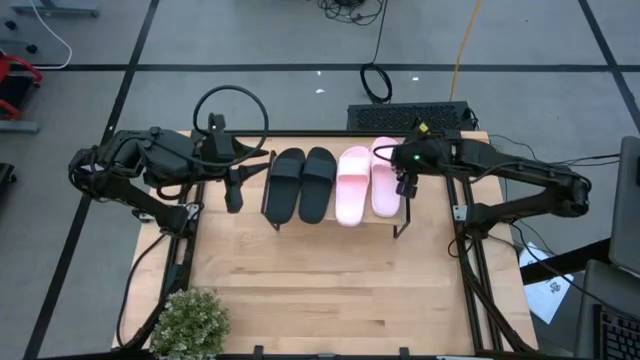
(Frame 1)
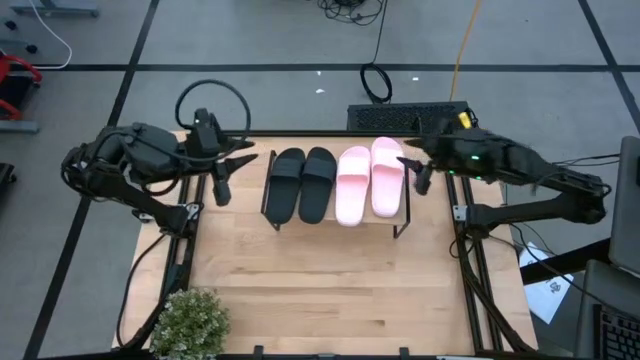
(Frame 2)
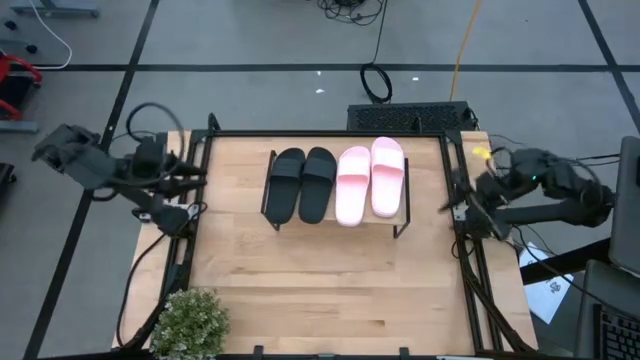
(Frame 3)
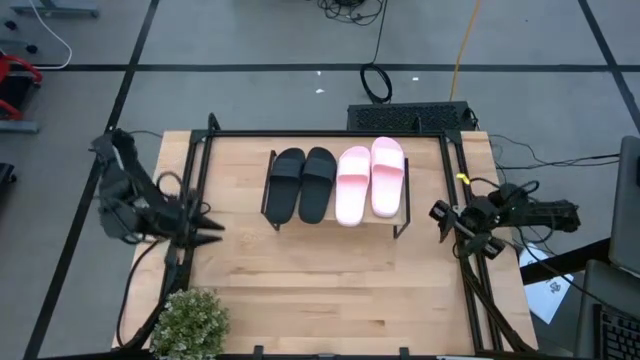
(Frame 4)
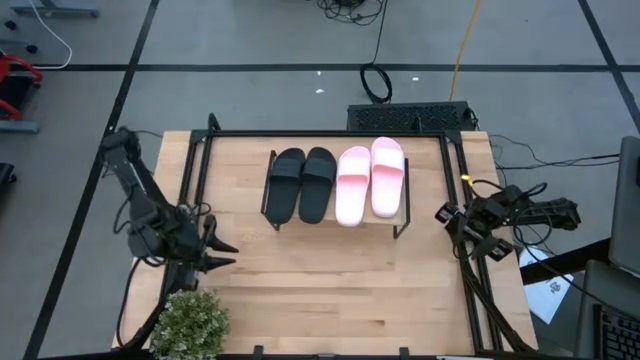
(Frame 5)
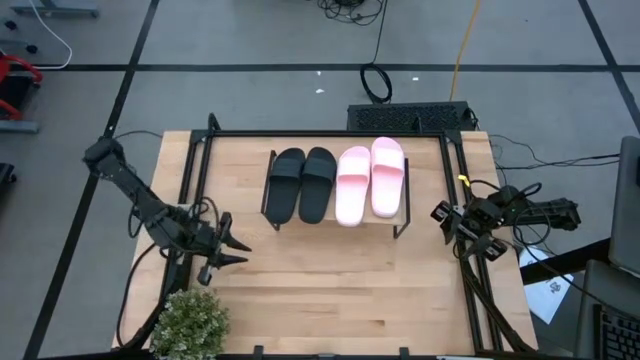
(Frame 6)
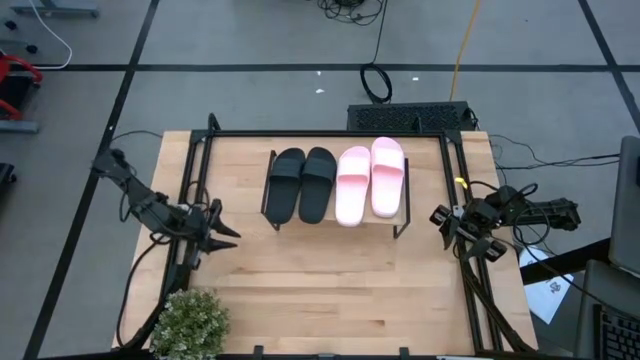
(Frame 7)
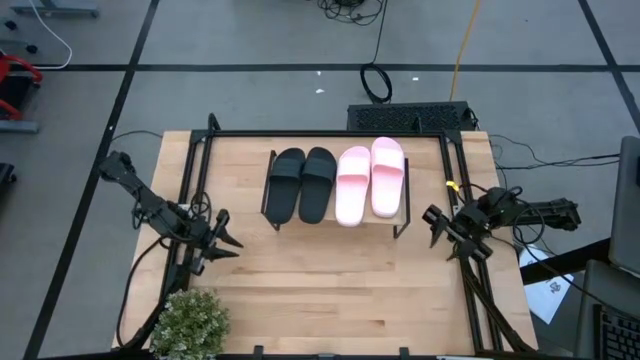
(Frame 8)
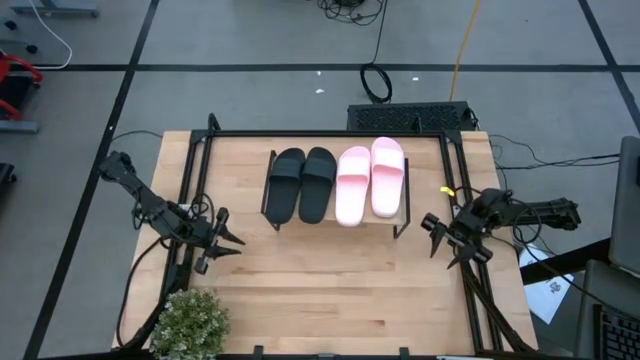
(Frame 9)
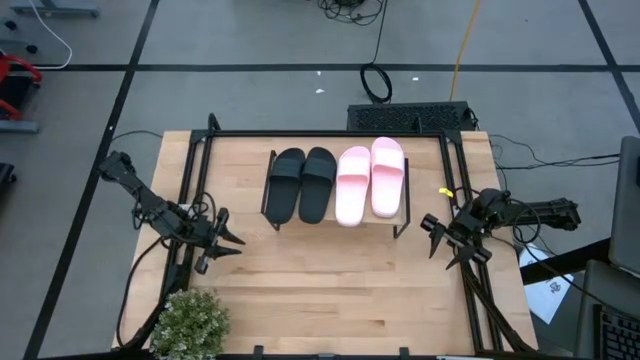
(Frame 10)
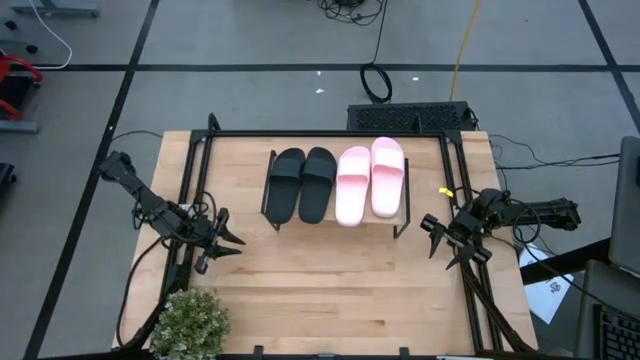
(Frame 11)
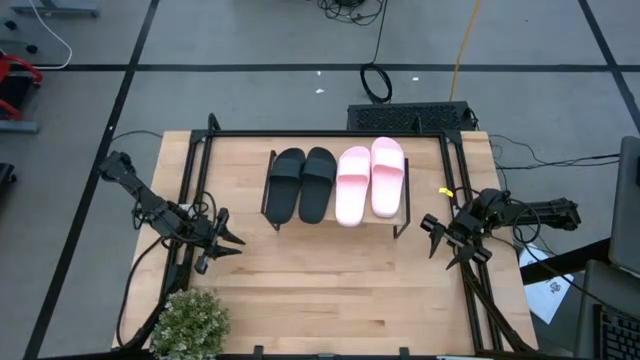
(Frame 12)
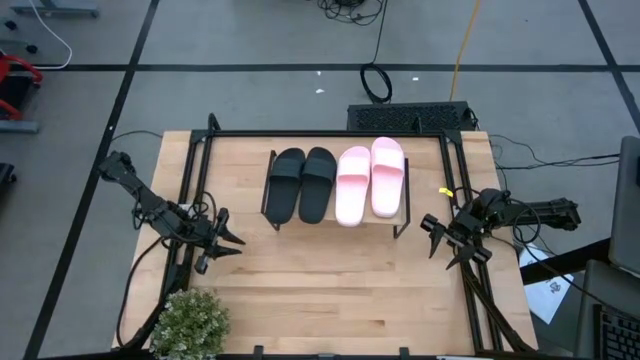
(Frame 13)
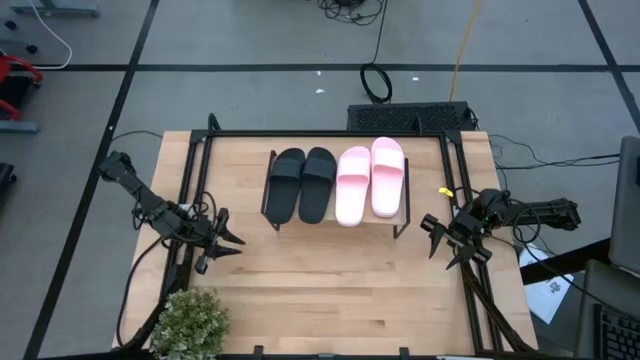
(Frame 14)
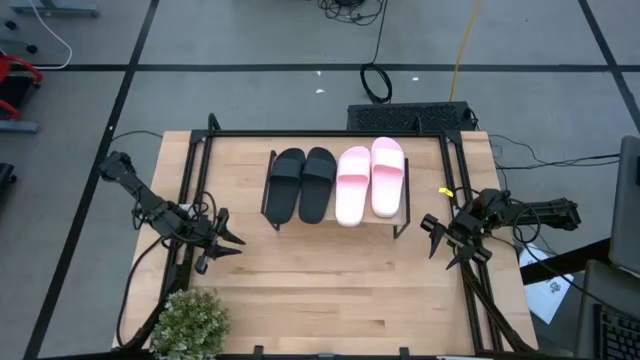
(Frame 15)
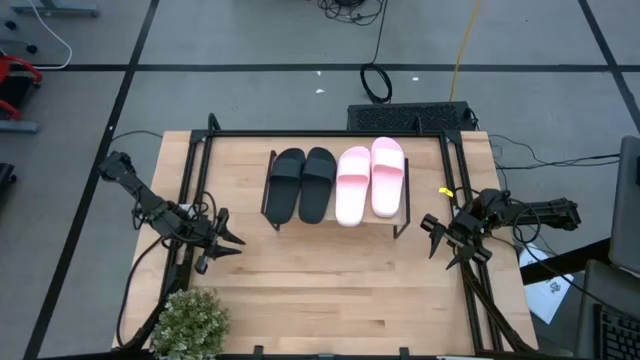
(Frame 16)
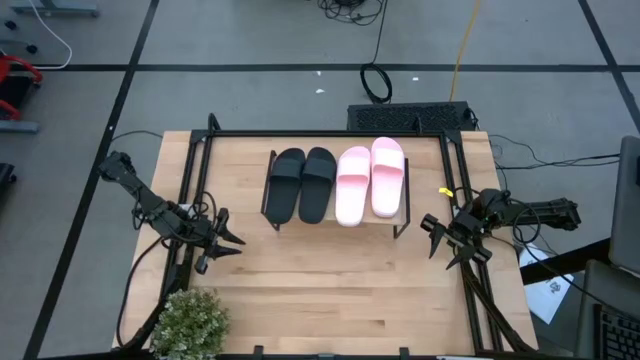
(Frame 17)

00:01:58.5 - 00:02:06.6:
Task: Pick and place slides into the shelf
Return to Home Position
